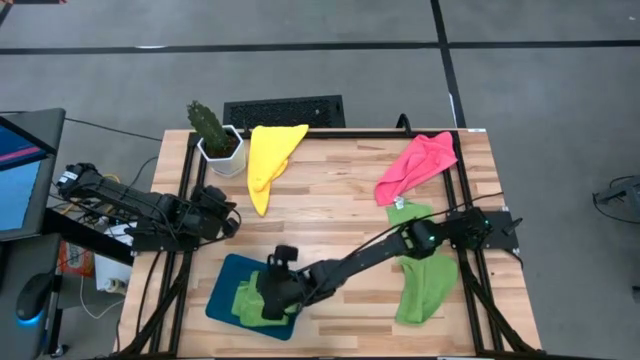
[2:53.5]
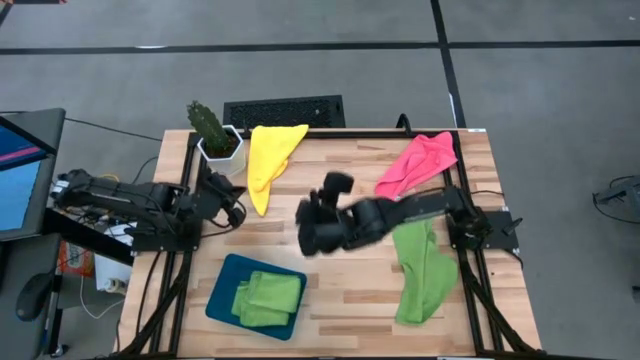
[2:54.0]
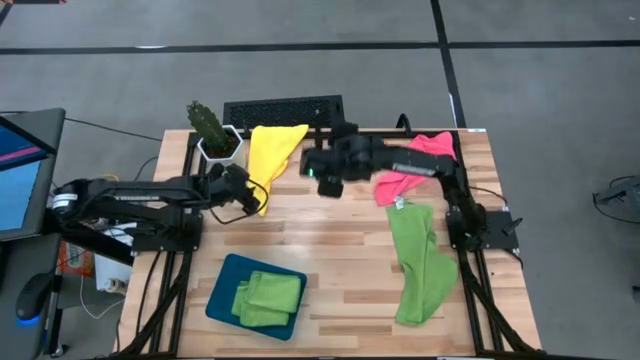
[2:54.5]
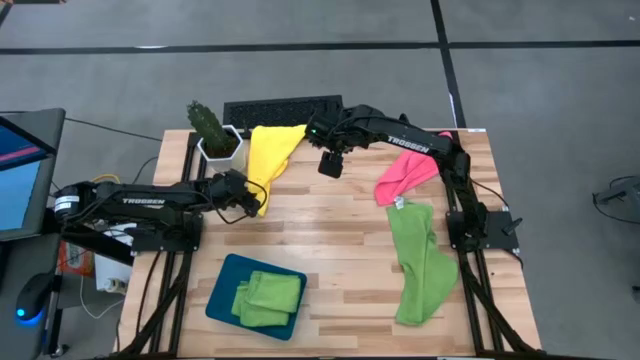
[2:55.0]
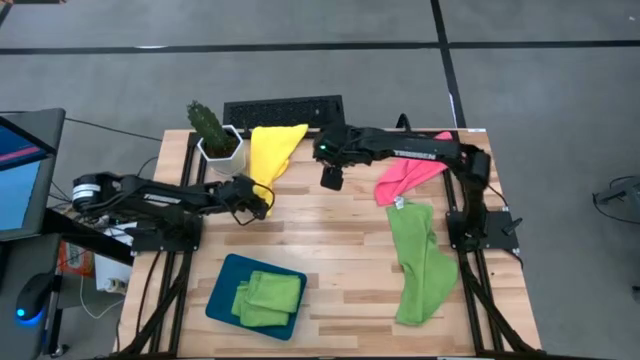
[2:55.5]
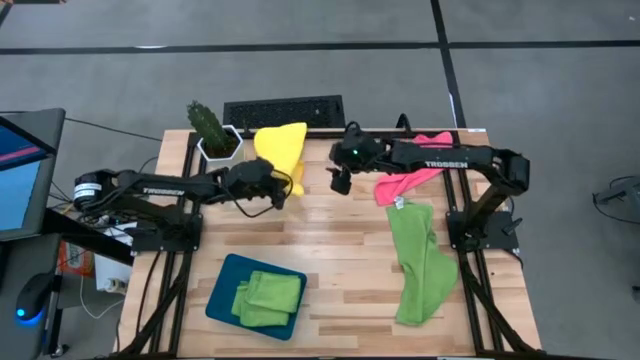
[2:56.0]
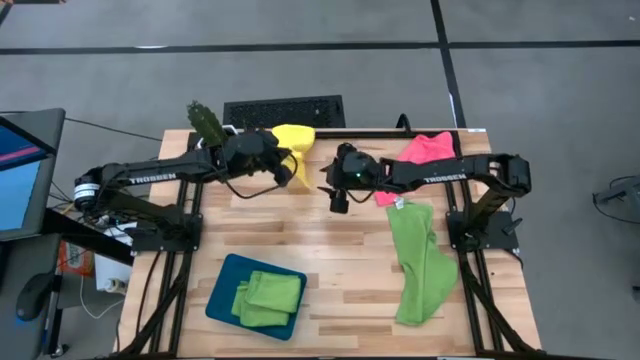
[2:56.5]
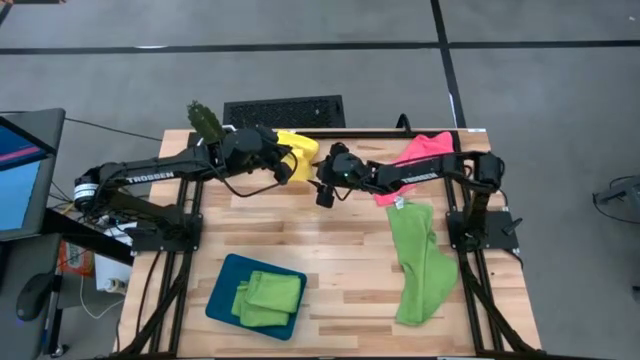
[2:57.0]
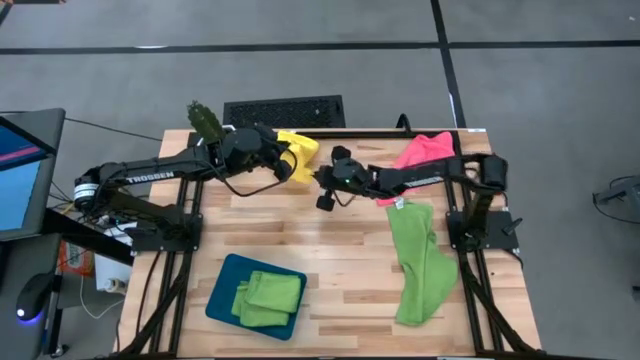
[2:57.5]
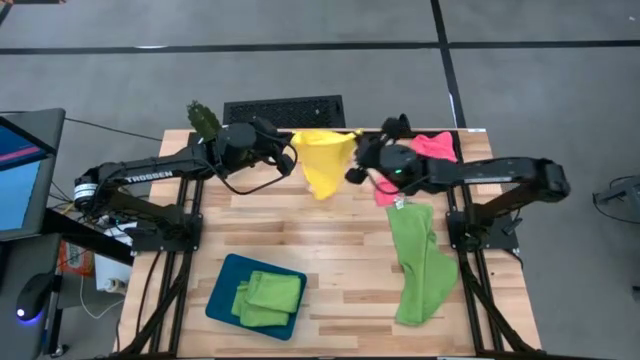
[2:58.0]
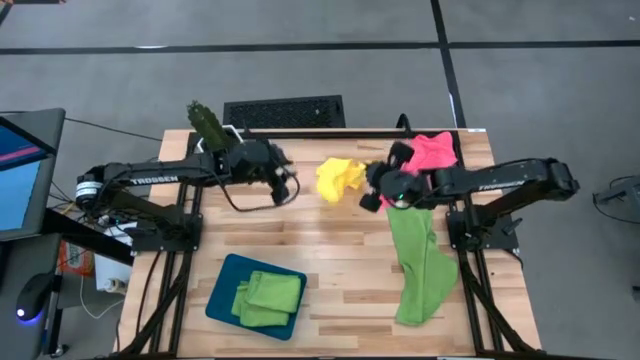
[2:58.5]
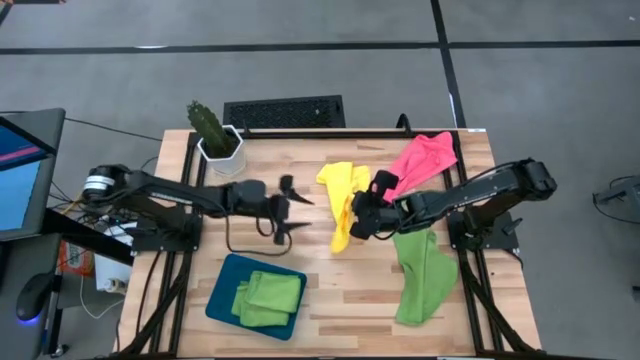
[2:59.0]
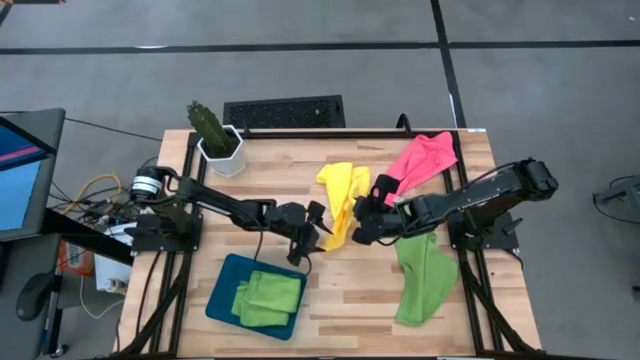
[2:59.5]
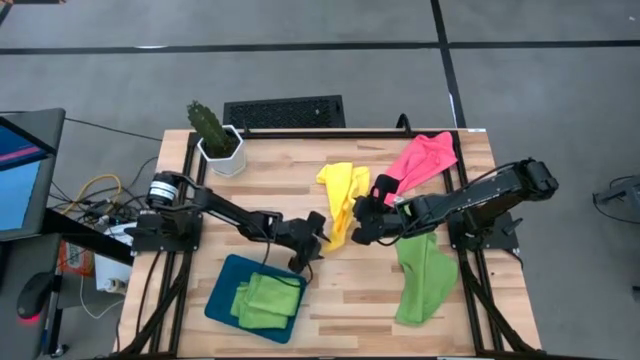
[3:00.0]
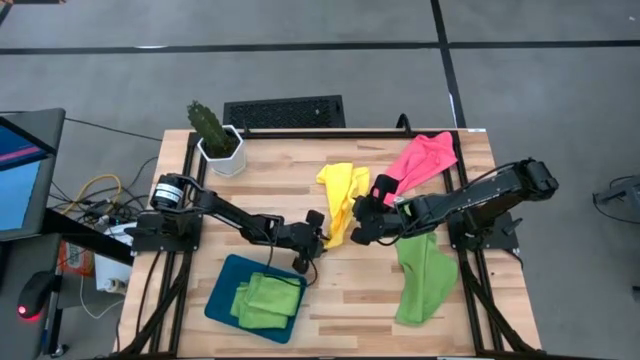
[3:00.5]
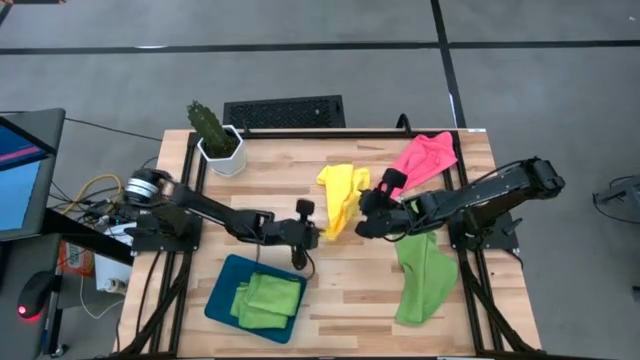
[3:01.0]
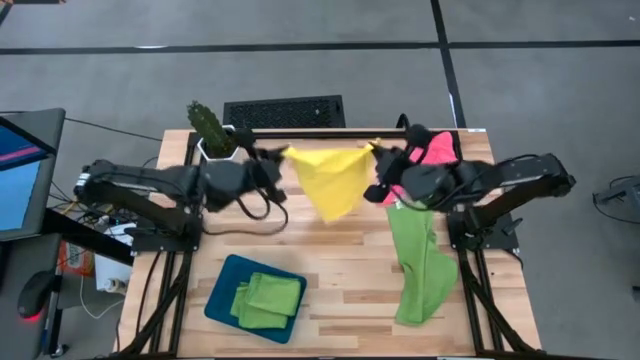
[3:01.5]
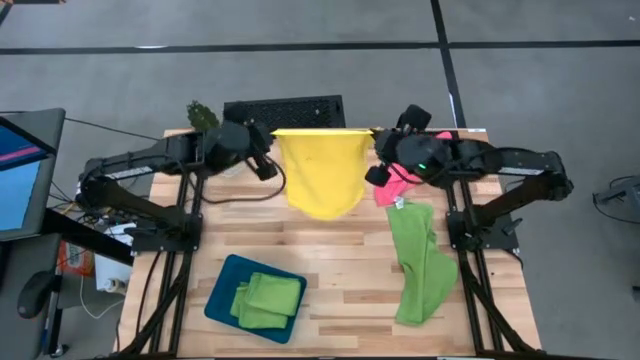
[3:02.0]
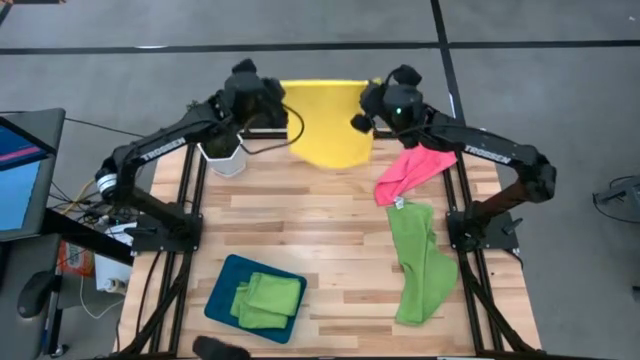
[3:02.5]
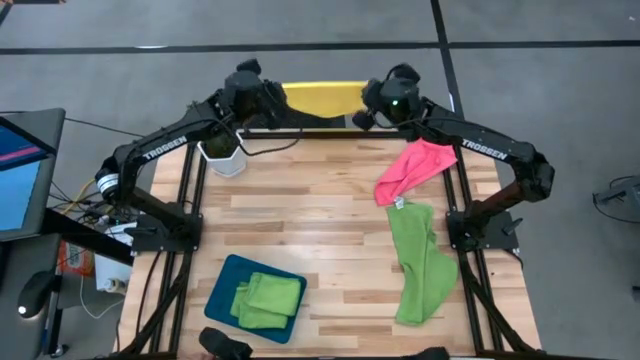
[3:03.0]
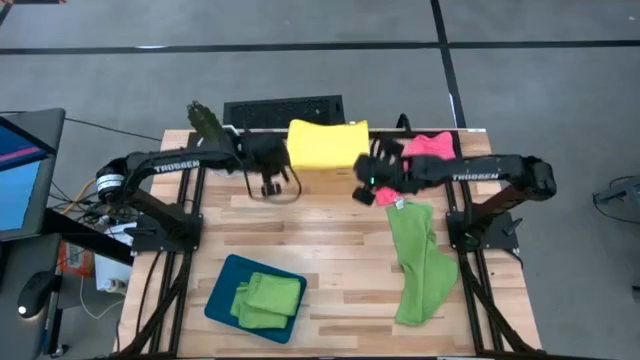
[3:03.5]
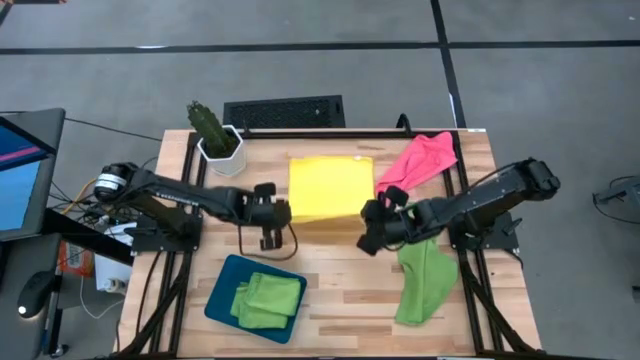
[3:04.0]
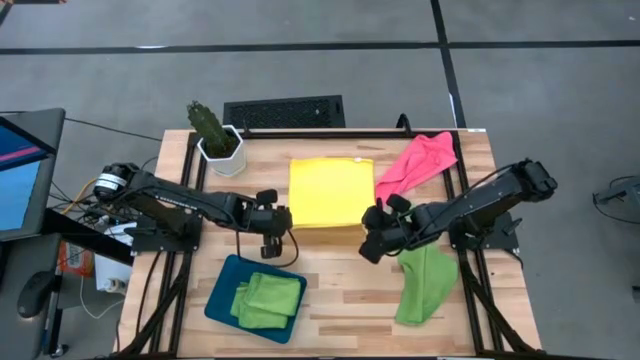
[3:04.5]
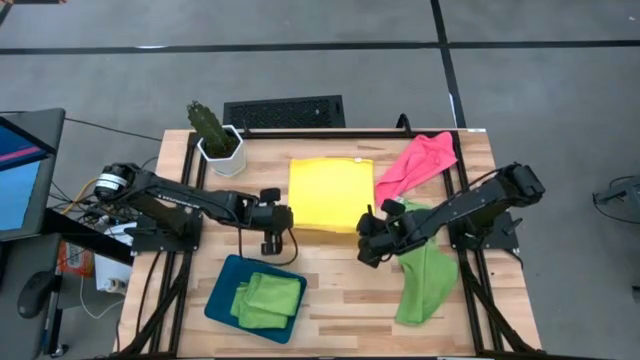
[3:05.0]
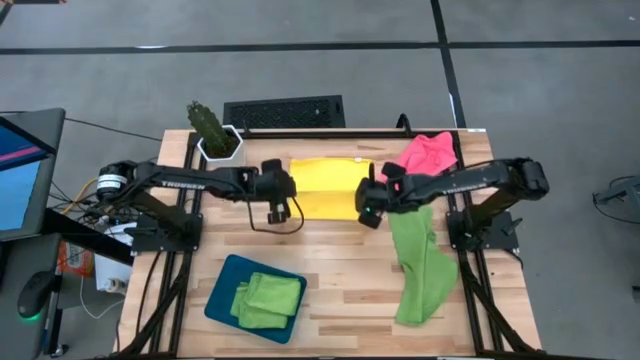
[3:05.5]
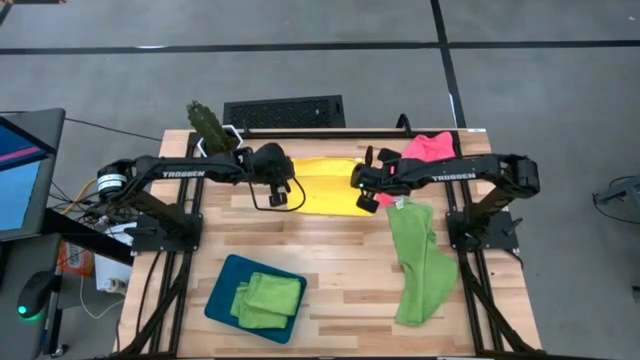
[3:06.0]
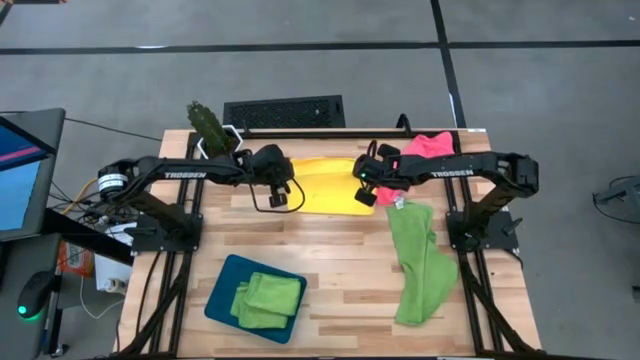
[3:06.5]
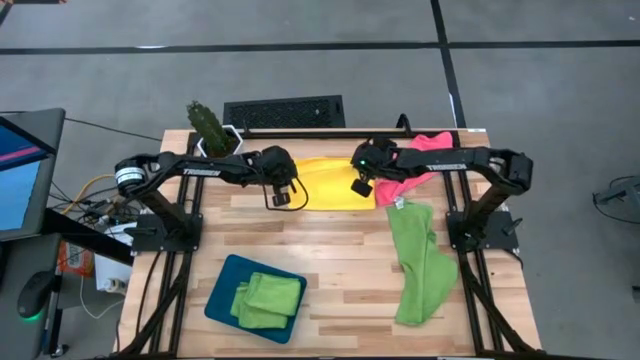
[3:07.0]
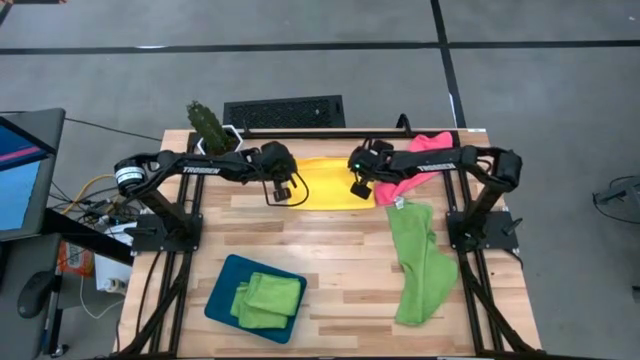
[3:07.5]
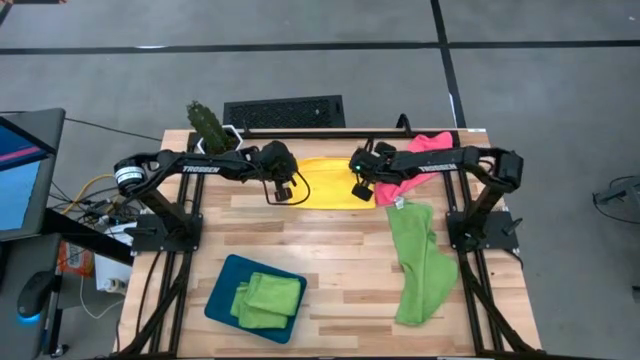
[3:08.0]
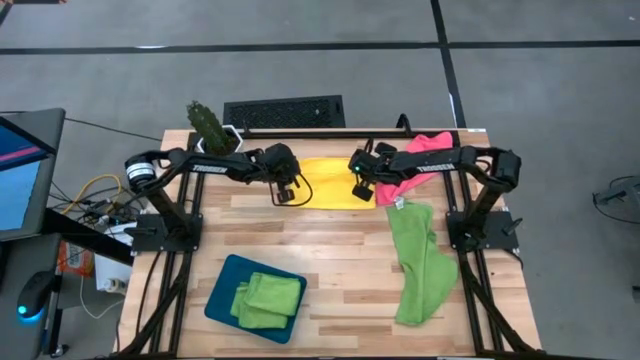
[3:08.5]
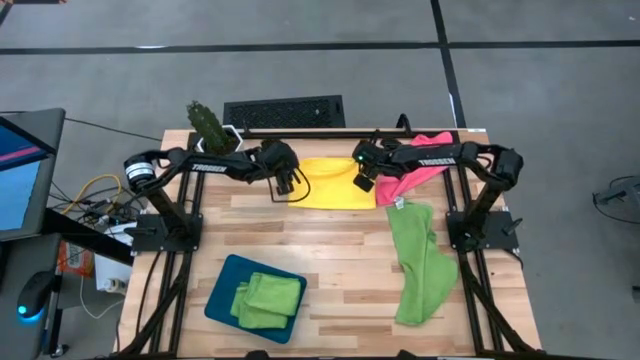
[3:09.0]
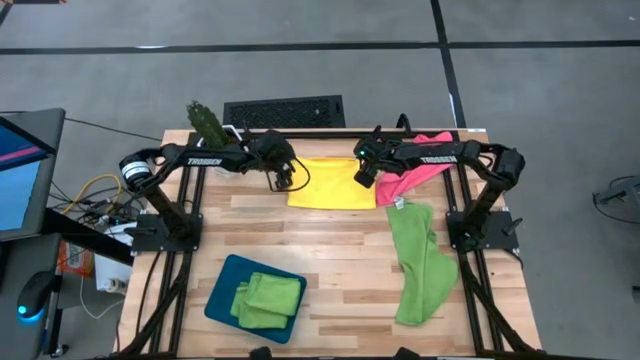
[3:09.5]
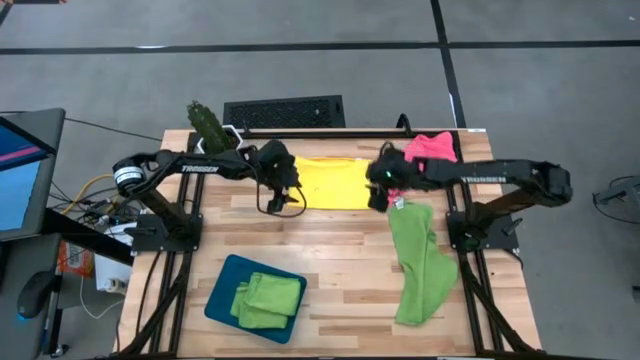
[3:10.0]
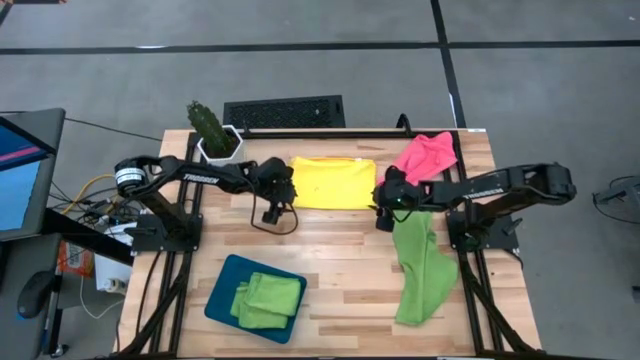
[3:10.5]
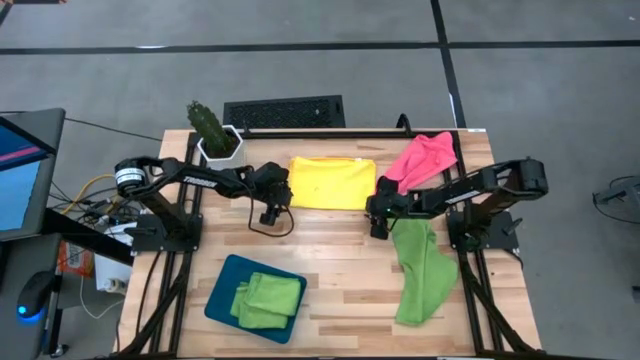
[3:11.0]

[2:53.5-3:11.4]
Task: Fold microfiber towels
Fold the yellow microfiber

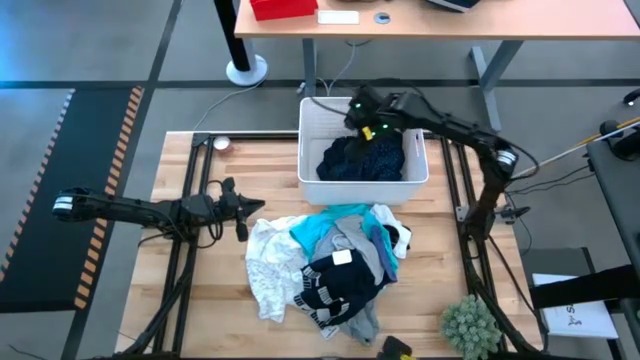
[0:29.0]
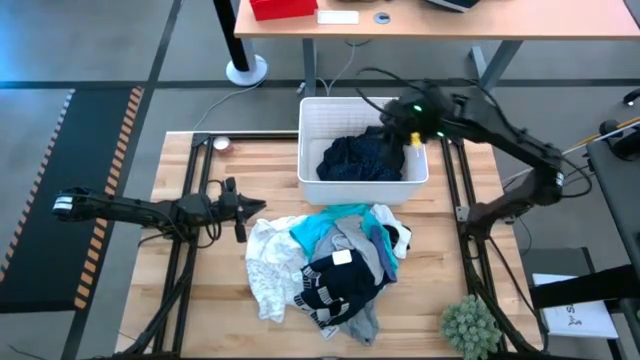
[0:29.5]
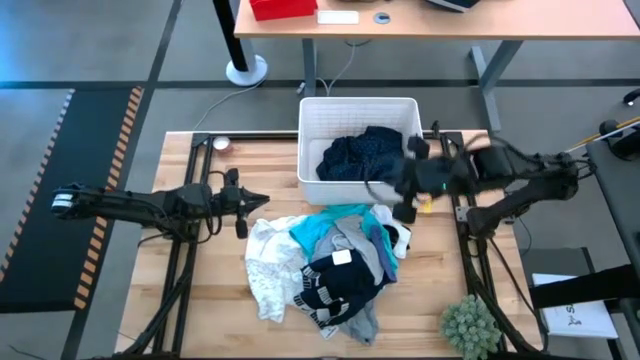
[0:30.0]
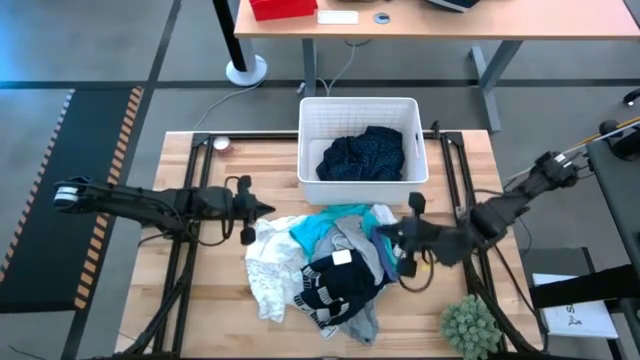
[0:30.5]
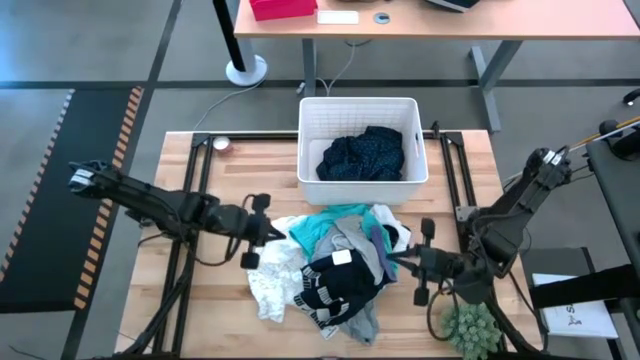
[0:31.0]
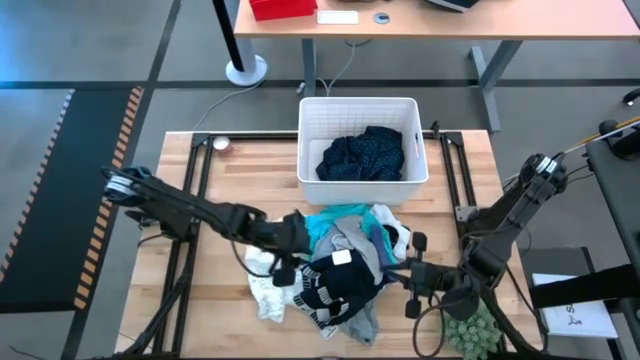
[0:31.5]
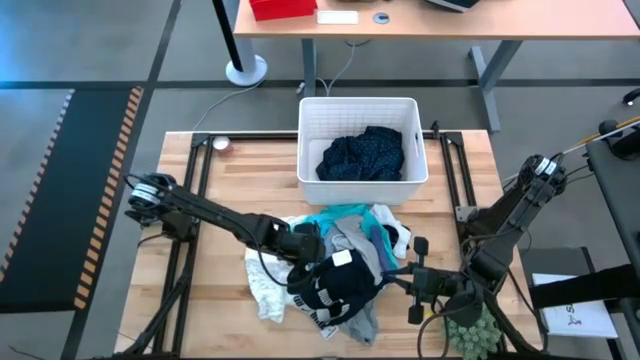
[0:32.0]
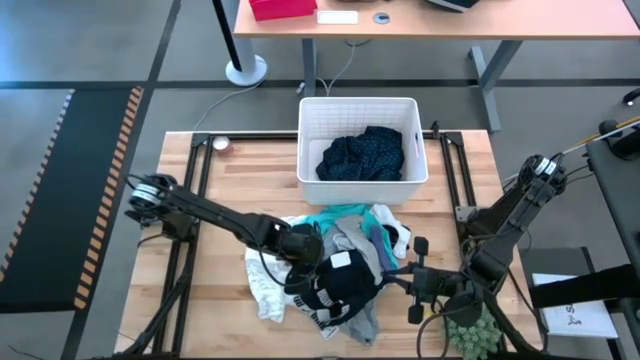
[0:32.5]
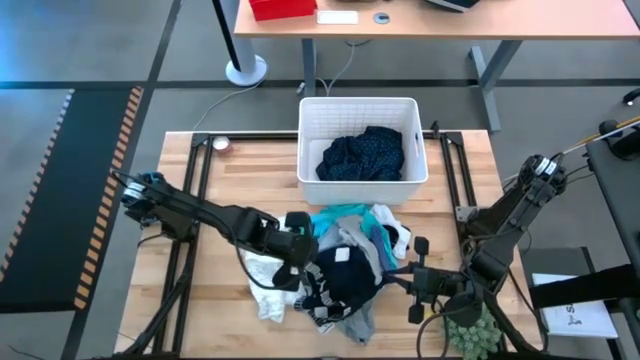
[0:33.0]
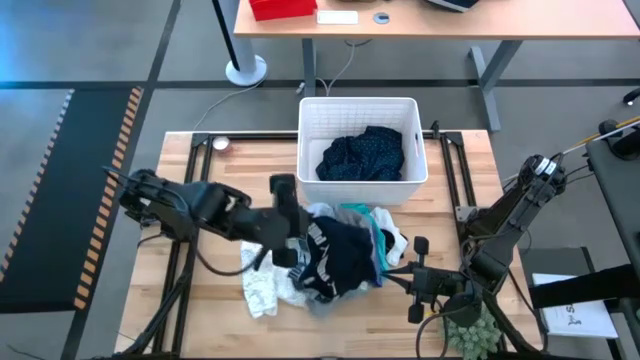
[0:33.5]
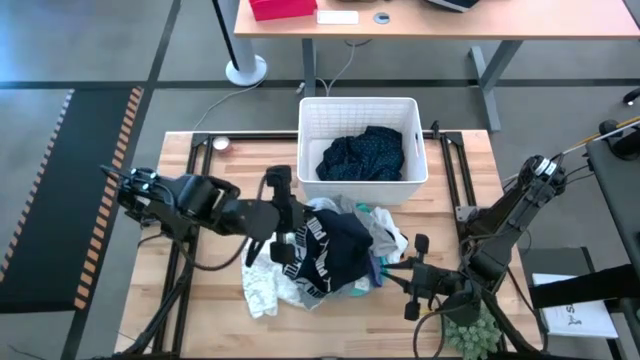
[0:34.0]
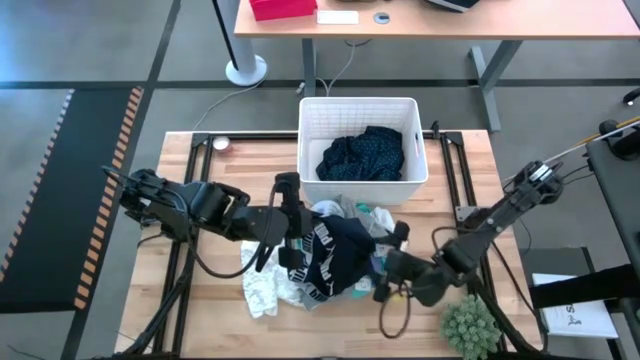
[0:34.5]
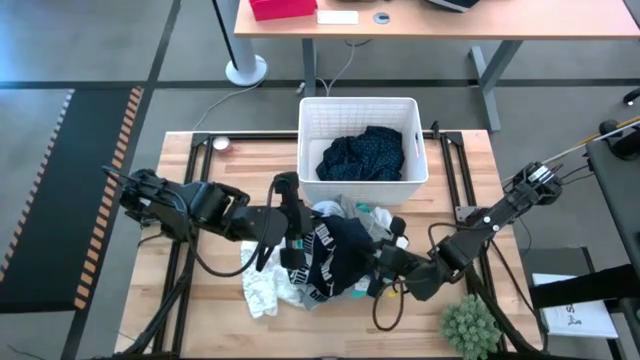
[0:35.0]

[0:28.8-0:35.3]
Task: Sort clothes
Put the black boxer shorts into the white laundry bin
